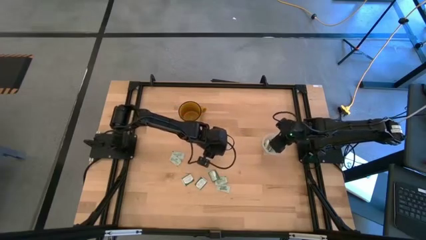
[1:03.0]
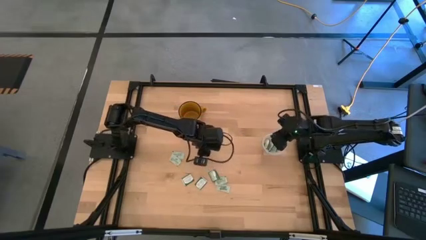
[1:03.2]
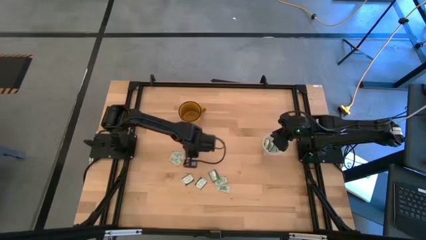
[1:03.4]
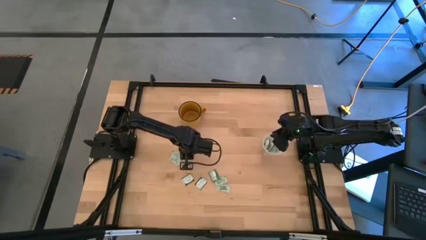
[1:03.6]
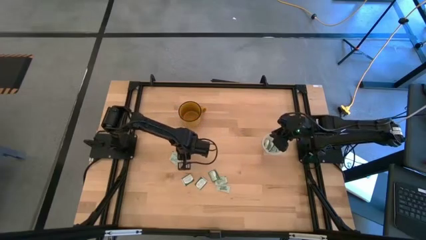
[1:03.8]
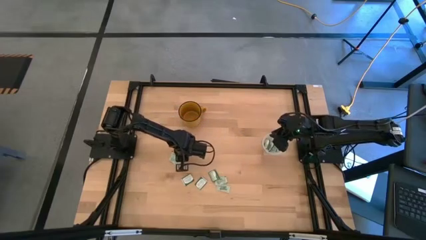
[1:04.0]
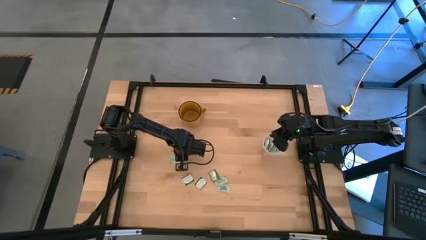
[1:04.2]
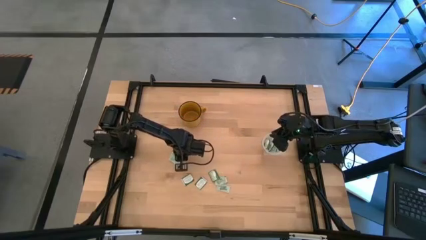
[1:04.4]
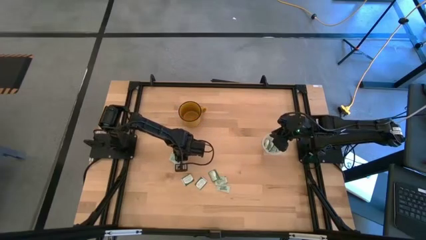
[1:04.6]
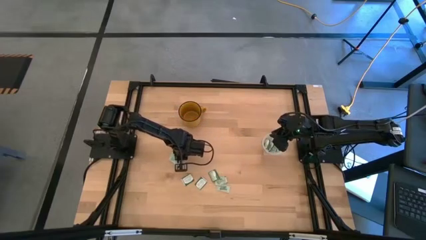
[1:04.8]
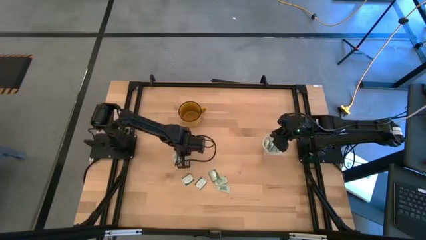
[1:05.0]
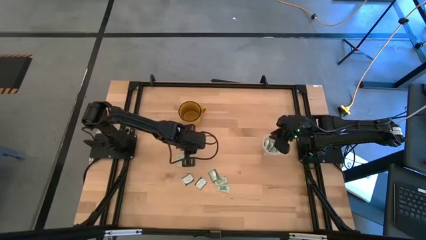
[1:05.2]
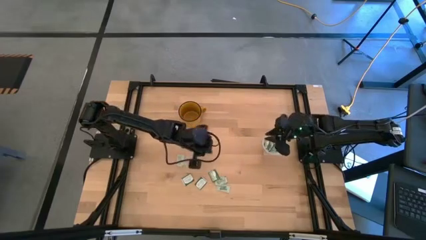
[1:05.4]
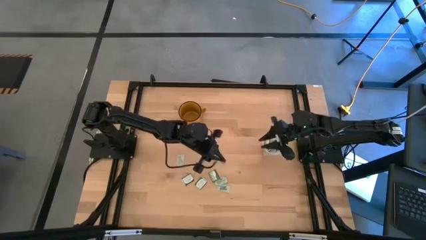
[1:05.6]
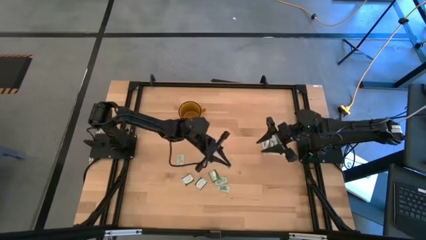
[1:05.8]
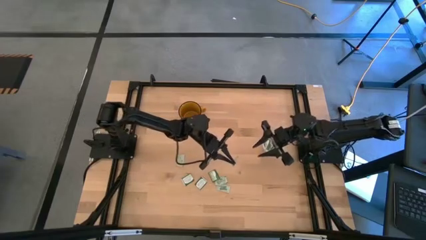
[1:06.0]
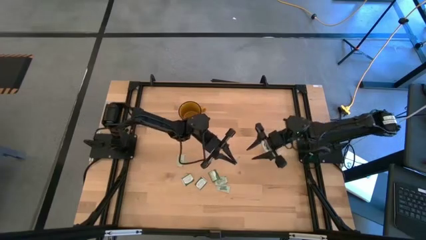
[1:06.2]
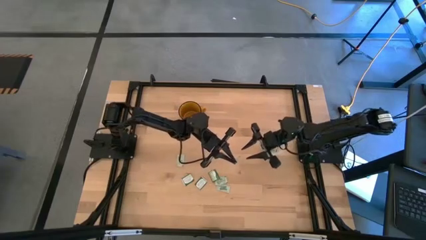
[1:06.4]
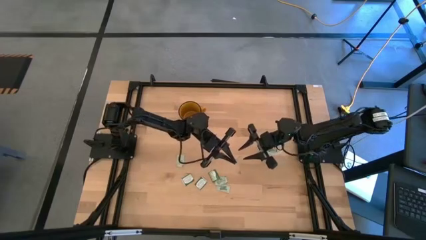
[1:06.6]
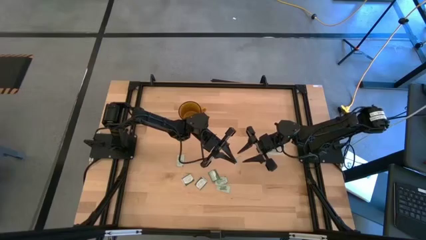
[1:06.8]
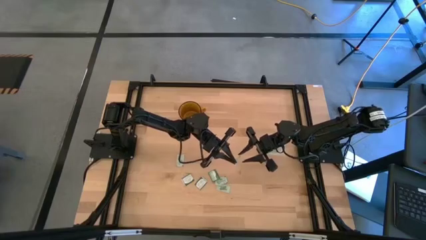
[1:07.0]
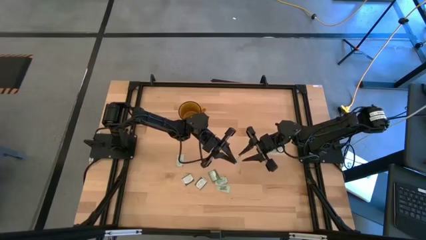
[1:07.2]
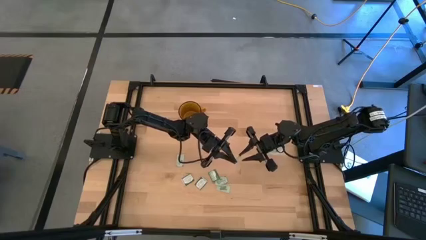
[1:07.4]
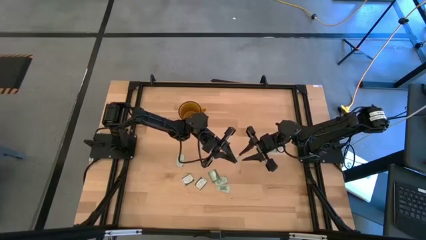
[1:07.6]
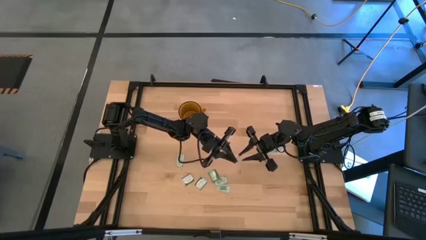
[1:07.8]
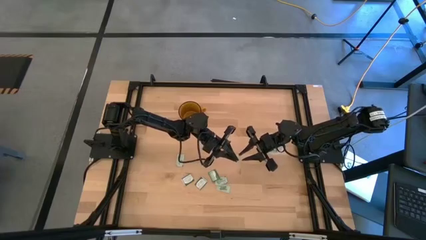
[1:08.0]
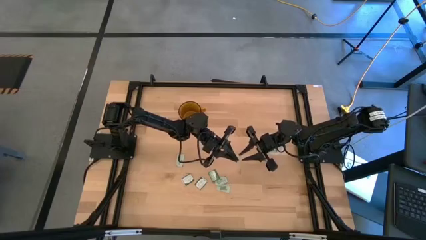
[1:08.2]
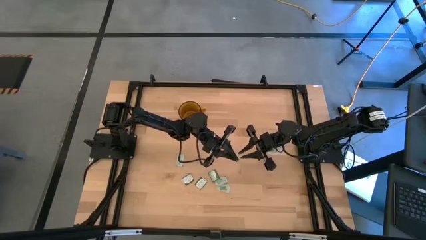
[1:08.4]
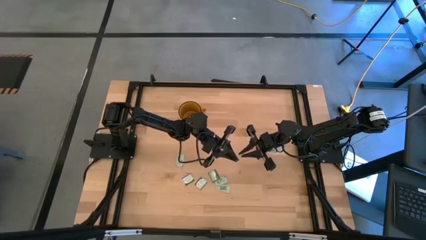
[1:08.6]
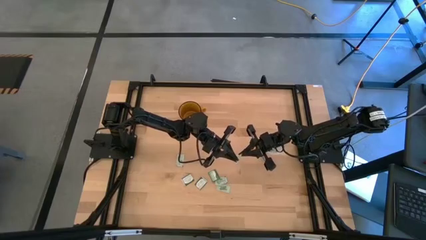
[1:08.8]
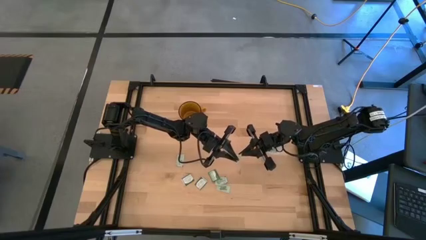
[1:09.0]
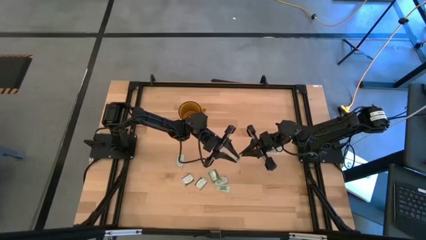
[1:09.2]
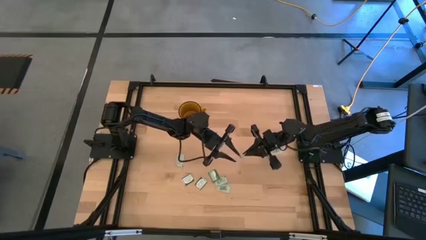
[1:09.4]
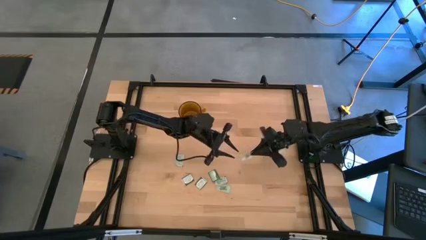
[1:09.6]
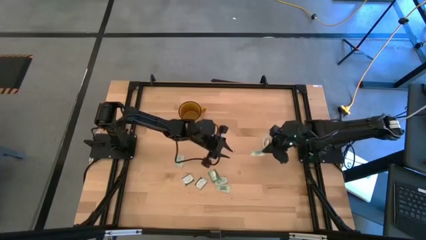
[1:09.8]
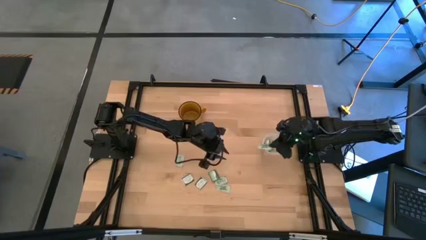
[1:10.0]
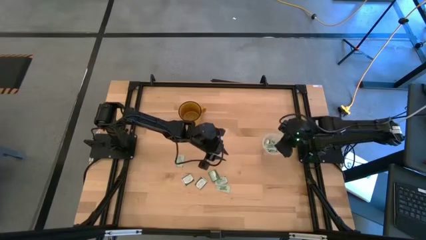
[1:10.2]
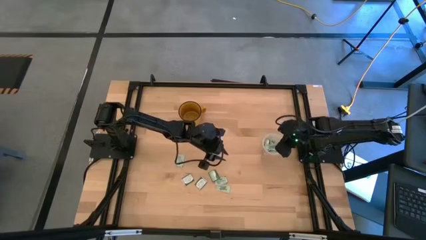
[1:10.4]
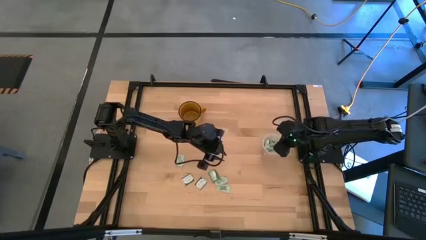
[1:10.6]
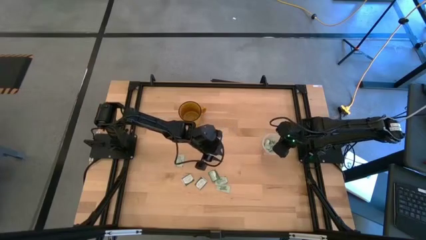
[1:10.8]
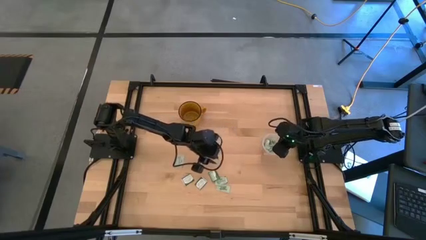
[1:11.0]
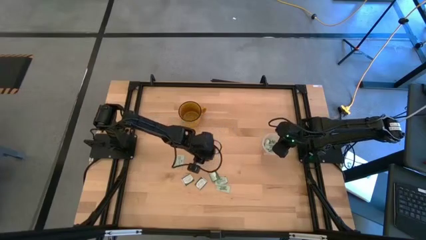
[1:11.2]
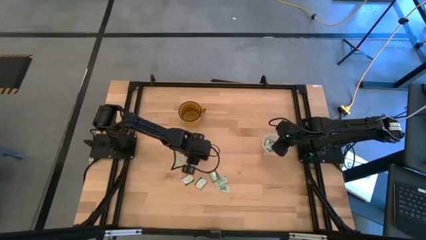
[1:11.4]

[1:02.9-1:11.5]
Task: Pick and place items into bin
Put the stevia packet into the transparent bin

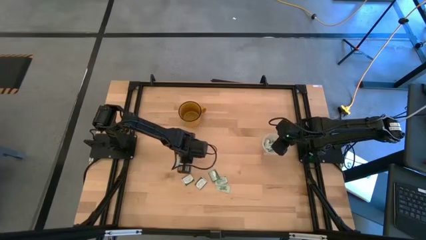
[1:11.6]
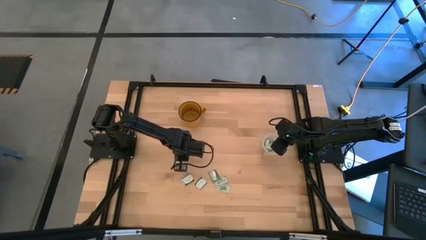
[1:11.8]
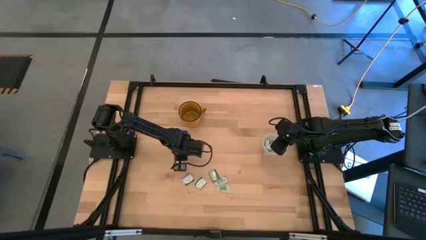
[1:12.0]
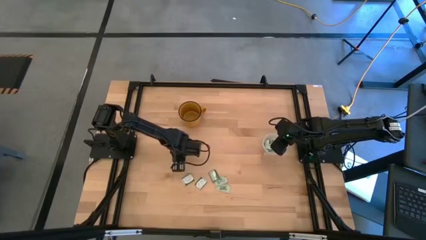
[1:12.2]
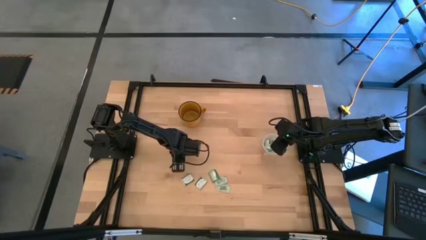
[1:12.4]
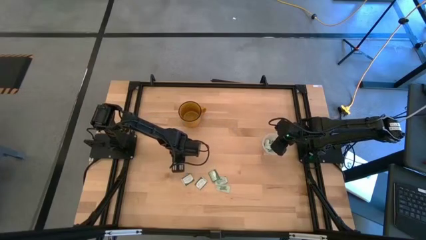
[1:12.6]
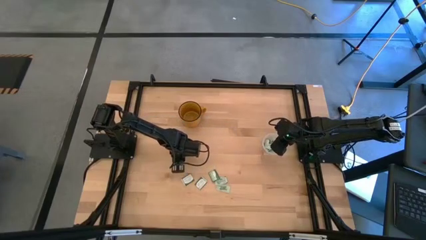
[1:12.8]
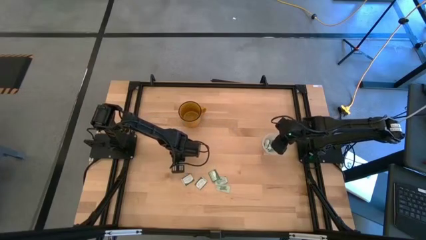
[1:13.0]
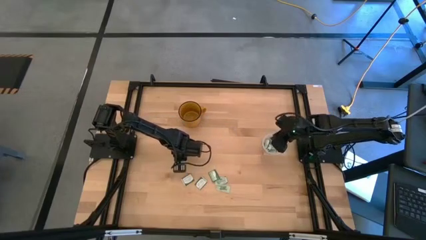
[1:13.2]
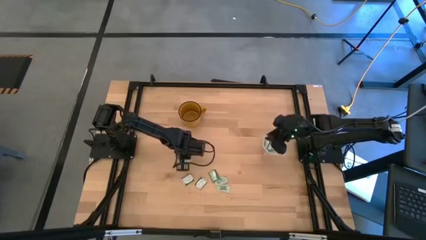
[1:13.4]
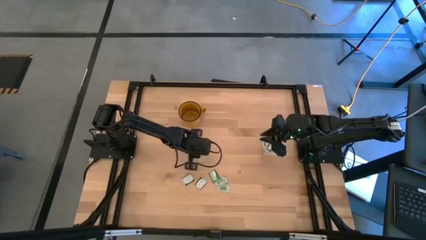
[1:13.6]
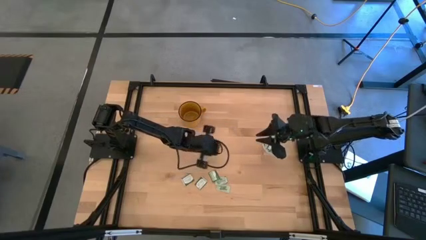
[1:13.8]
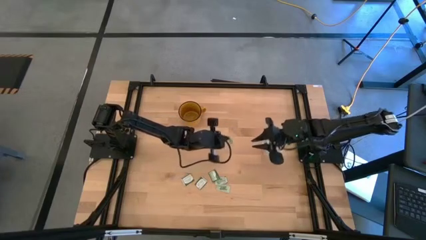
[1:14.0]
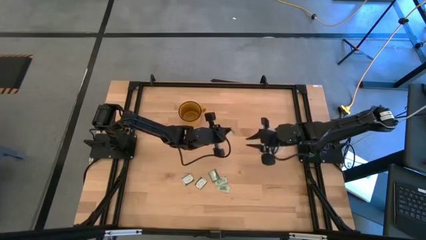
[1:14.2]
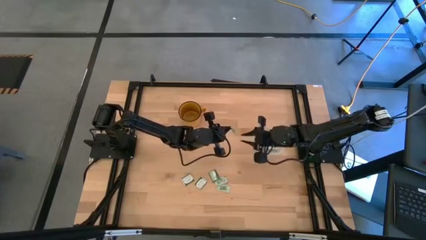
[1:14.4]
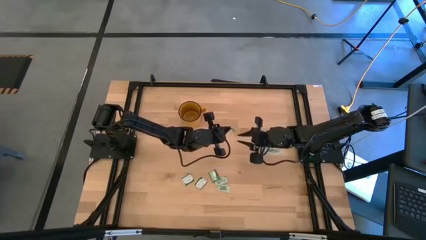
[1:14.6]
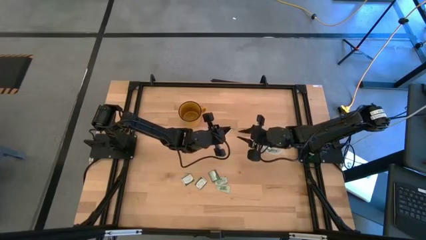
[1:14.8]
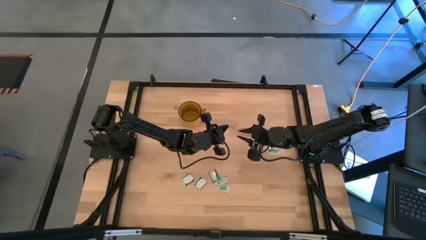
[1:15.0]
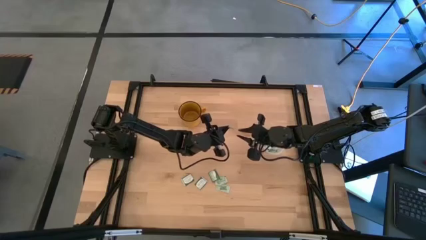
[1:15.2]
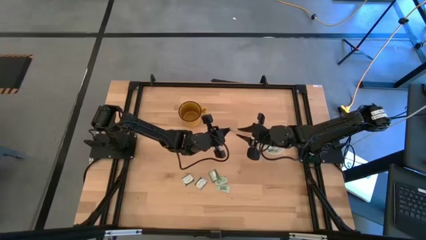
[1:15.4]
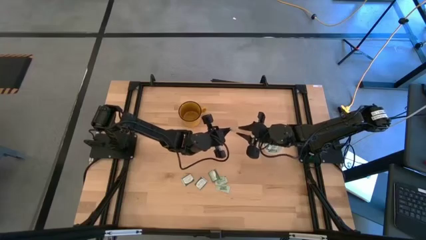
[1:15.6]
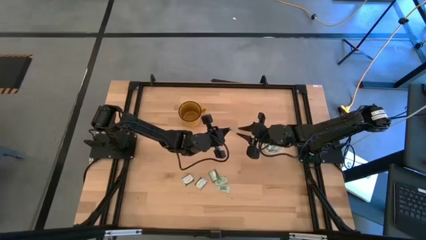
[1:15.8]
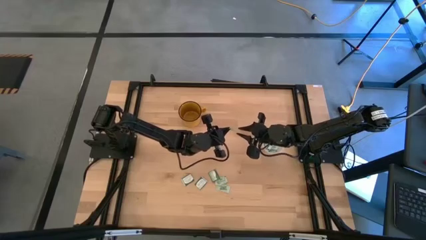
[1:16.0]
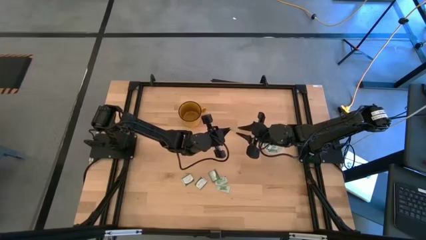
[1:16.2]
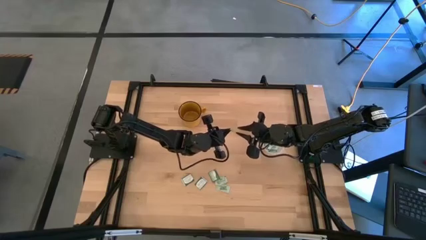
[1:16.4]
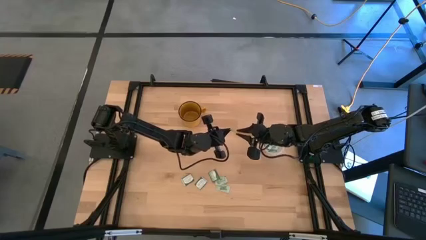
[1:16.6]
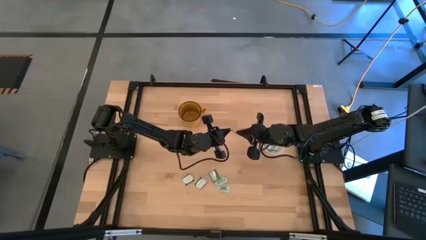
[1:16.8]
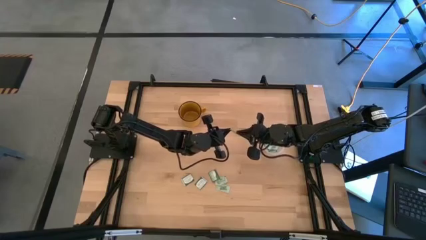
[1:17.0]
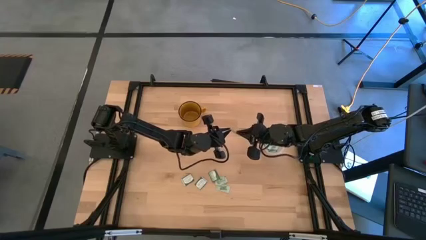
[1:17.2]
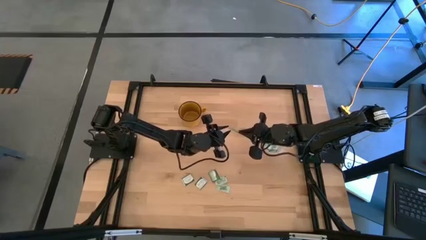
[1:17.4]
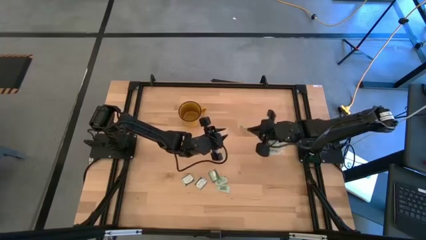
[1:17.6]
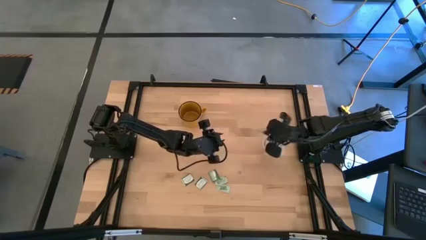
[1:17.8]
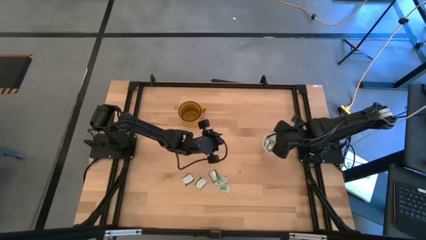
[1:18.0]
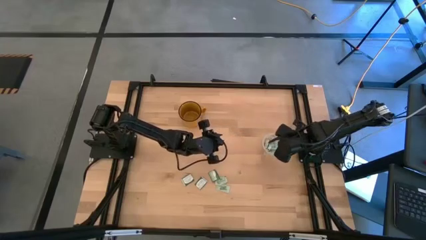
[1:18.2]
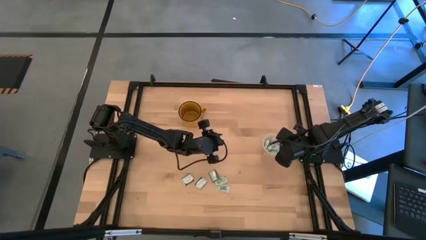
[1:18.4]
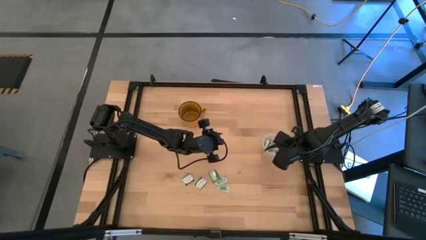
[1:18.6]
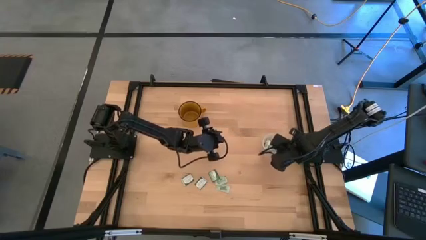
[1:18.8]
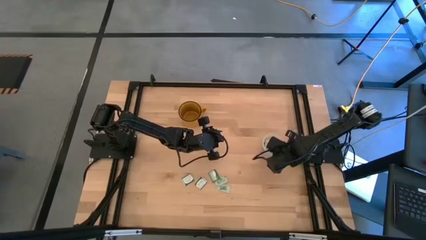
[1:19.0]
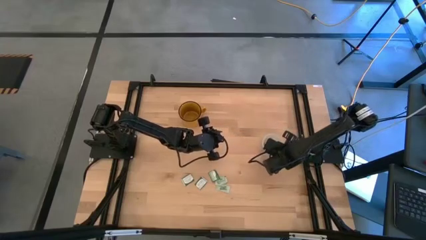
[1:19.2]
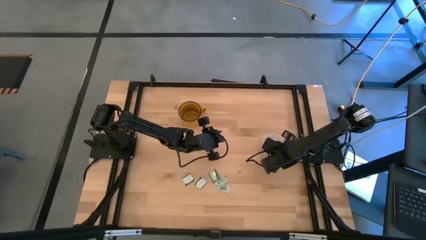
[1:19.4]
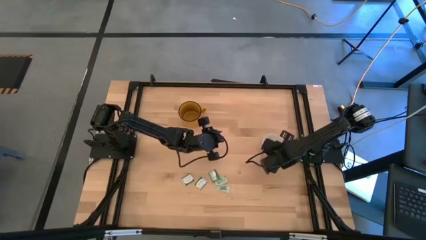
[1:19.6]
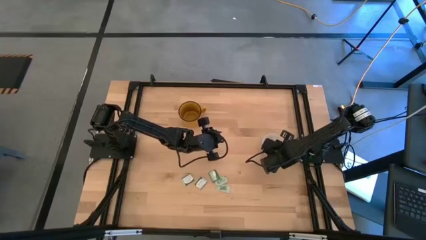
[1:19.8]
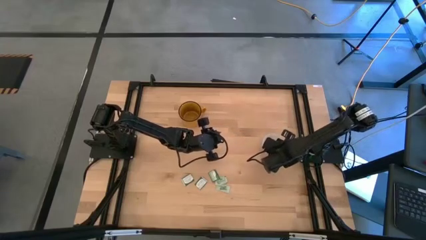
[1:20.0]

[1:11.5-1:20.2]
Put the stevia packet into the transparent bin
